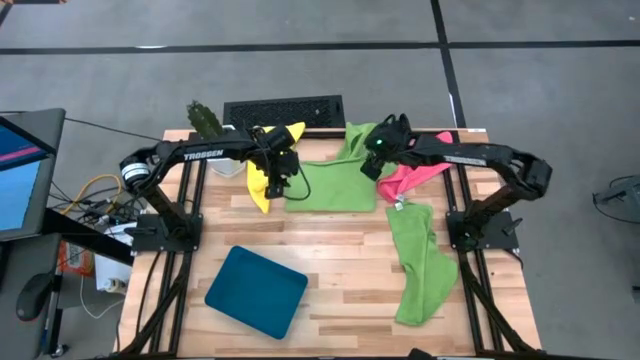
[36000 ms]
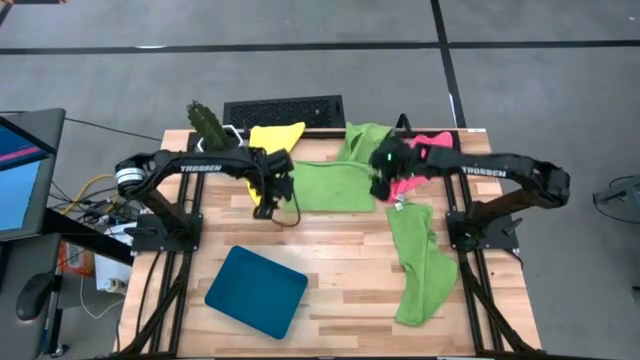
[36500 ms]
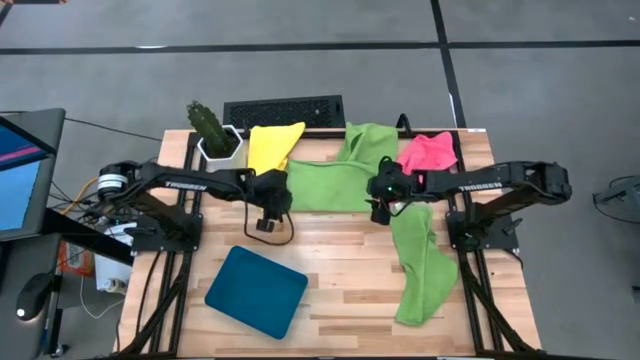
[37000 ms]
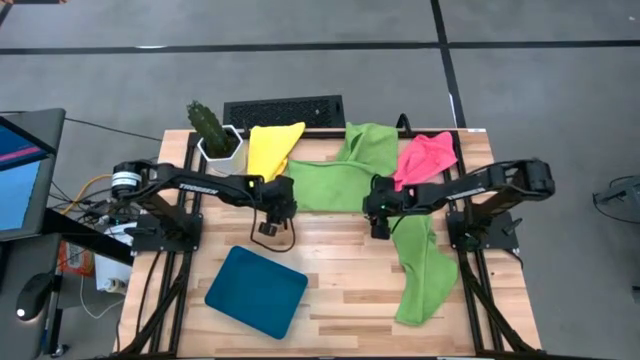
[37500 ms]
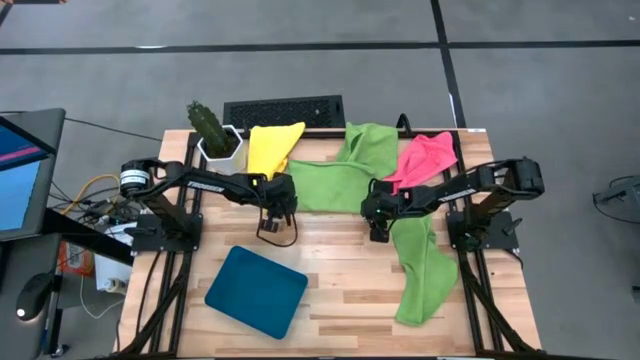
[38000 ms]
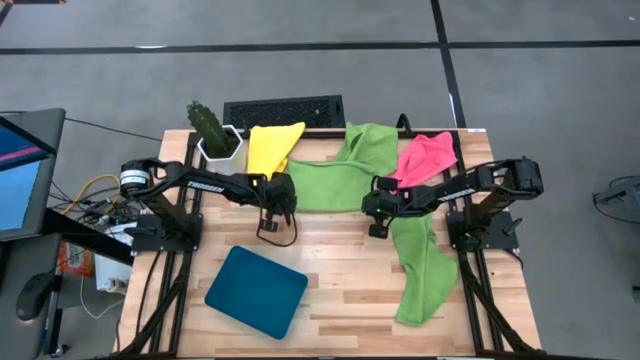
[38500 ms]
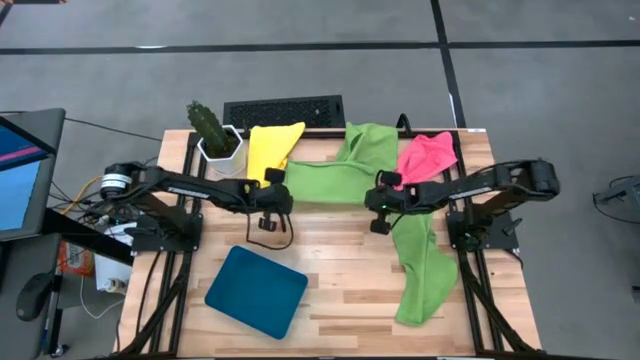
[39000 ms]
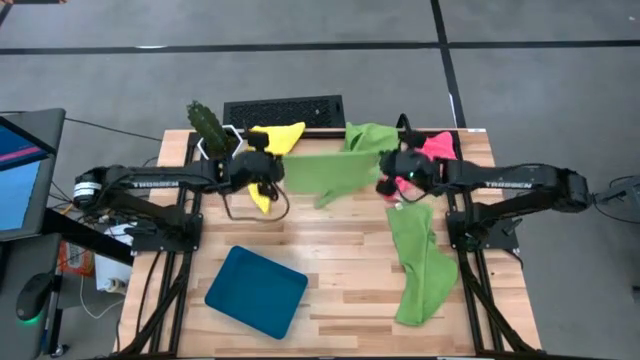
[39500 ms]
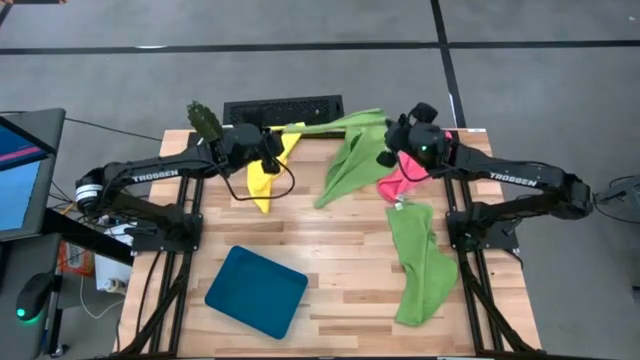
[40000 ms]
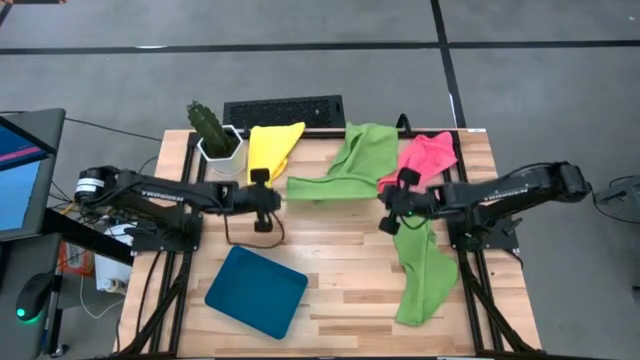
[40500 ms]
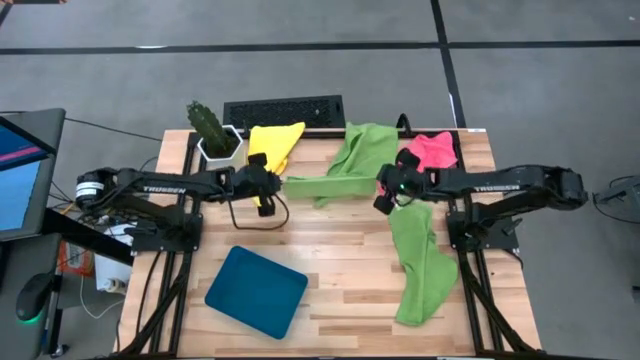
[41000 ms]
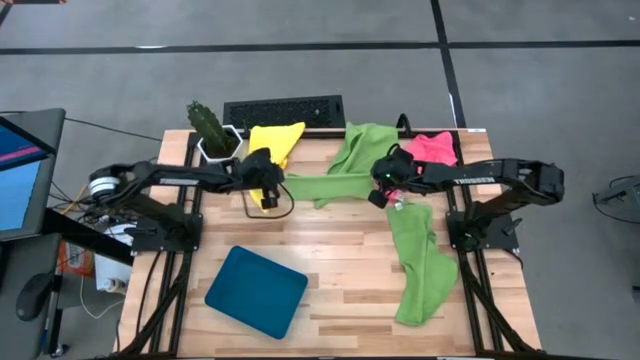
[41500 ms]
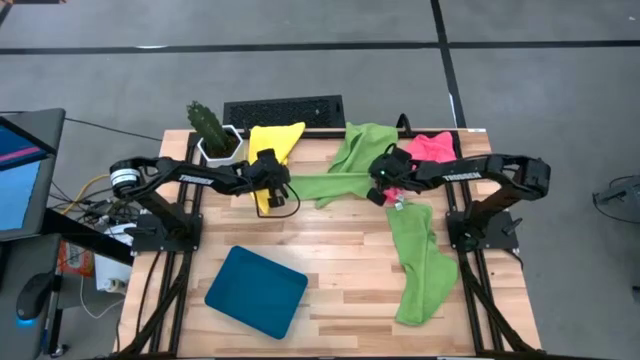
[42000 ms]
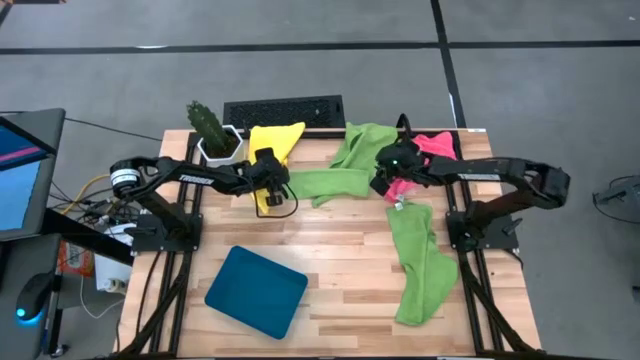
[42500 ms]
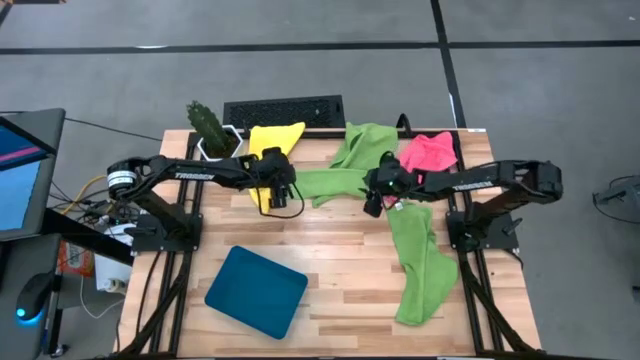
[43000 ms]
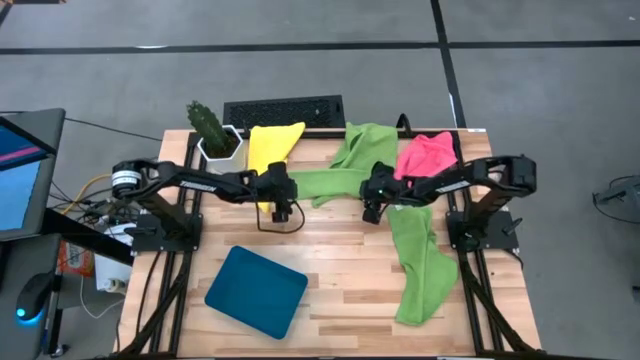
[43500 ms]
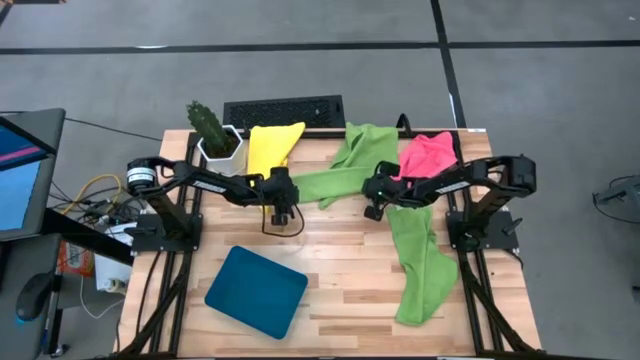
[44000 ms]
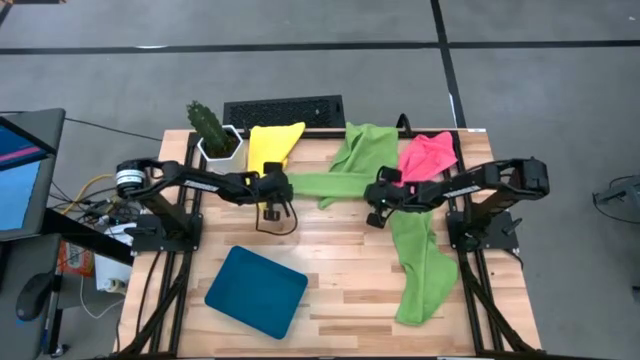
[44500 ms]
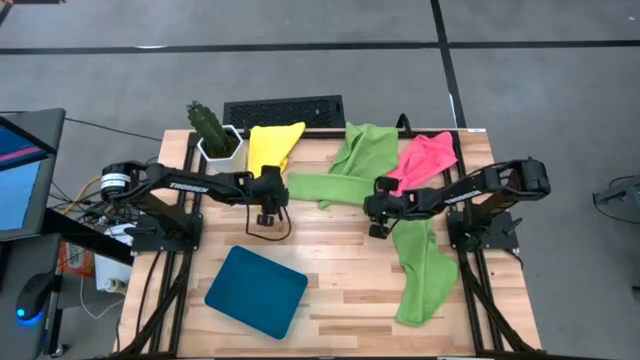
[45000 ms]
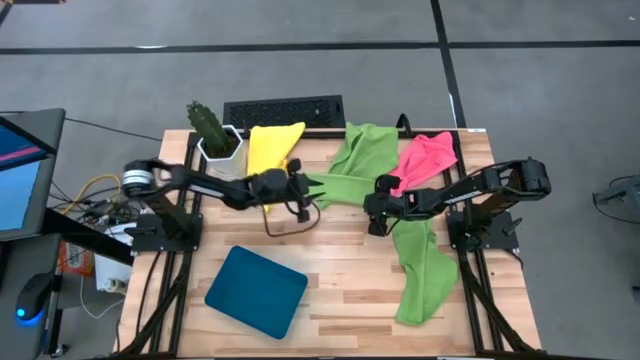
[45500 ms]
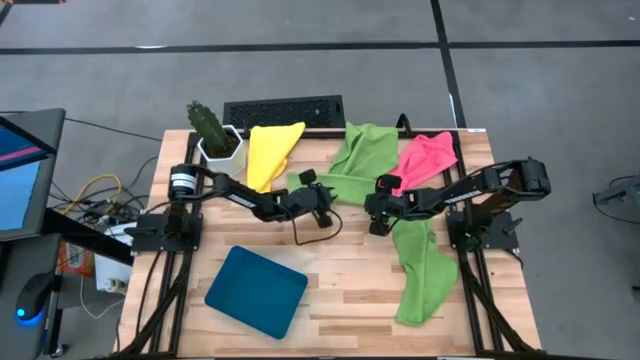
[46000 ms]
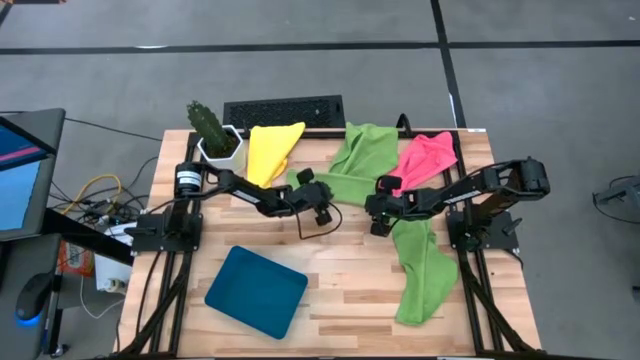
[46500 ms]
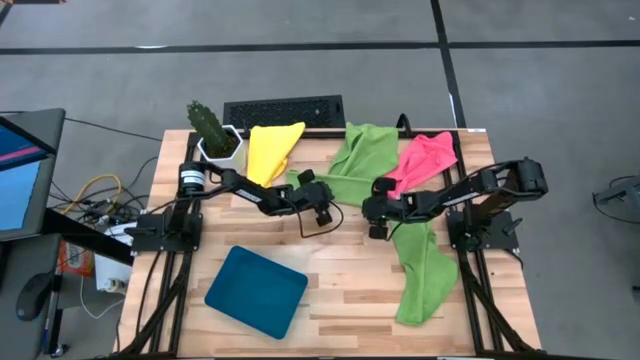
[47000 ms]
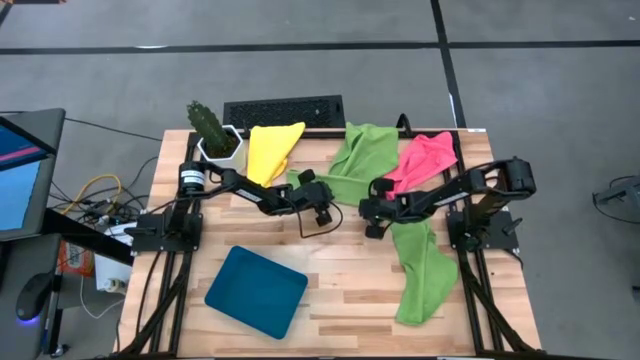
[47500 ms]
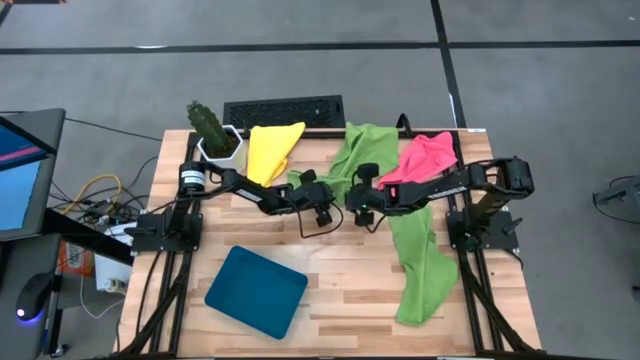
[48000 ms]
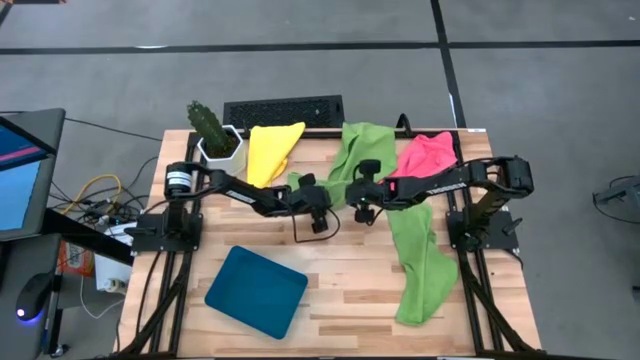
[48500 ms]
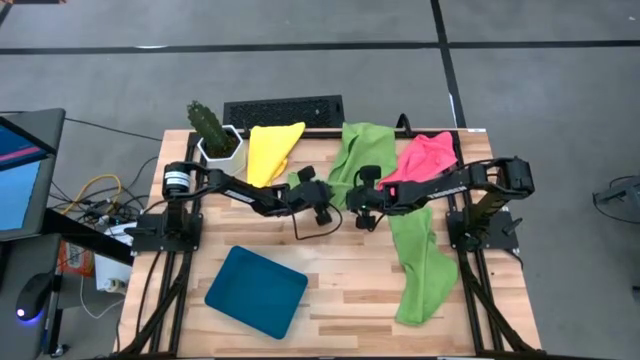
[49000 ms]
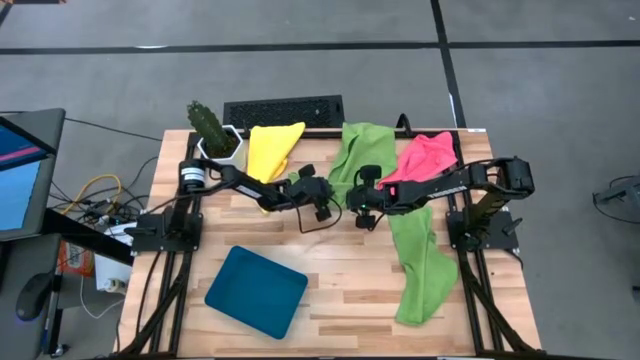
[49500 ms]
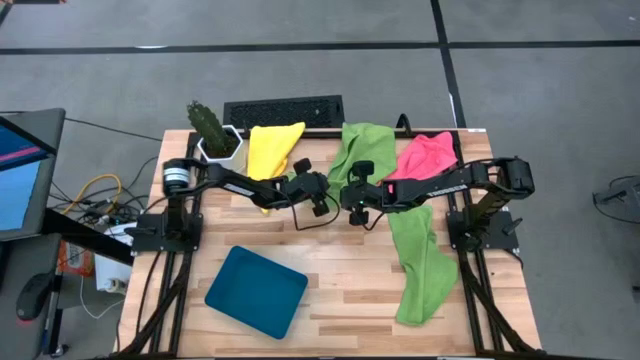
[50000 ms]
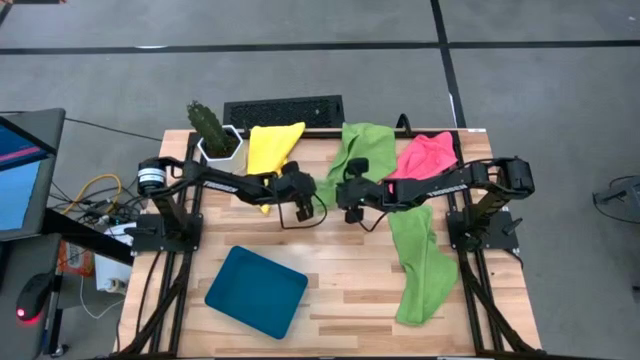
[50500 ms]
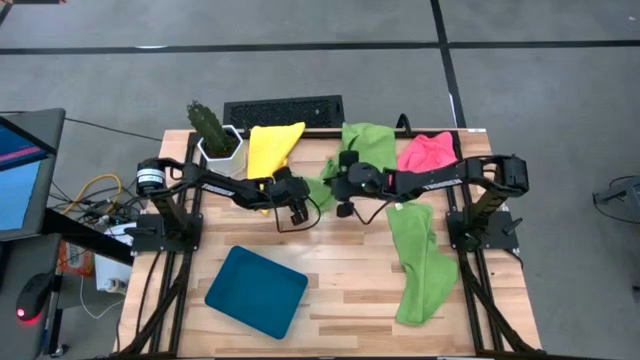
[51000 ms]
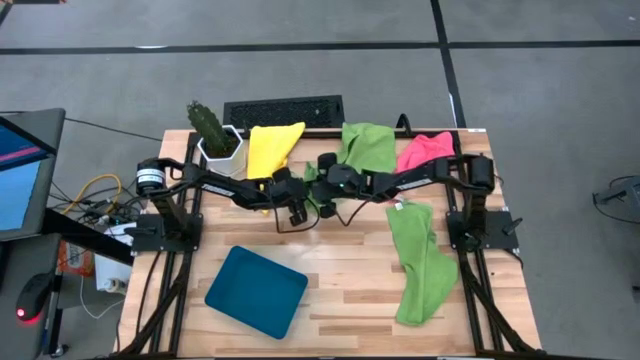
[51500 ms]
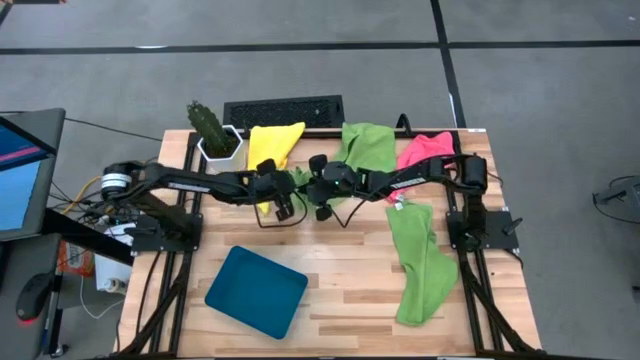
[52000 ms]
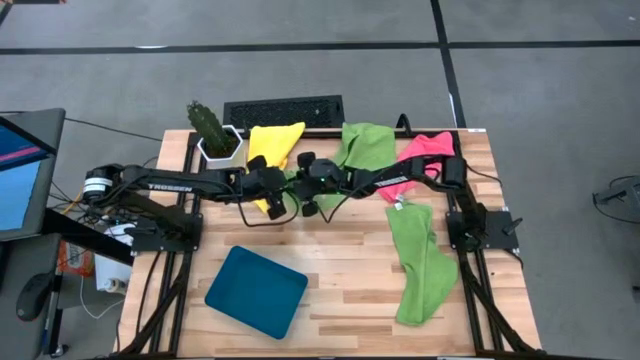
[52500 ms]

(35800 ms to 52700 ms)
Task: Fold microfiber towels
Fold the top left green microfiber

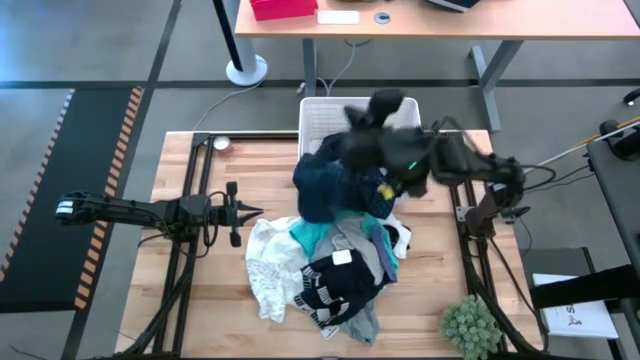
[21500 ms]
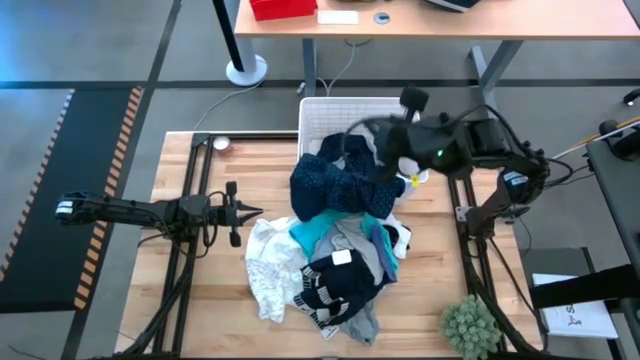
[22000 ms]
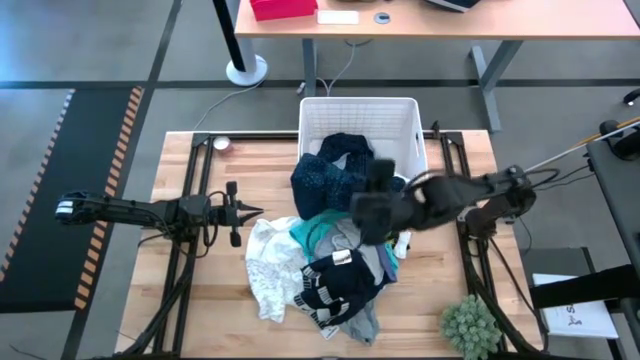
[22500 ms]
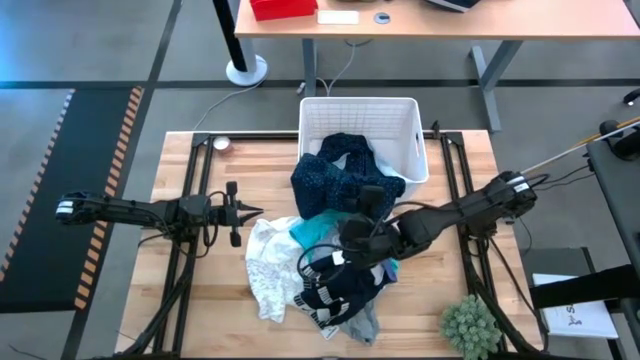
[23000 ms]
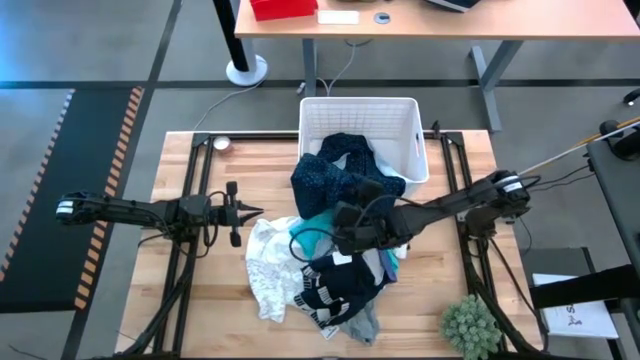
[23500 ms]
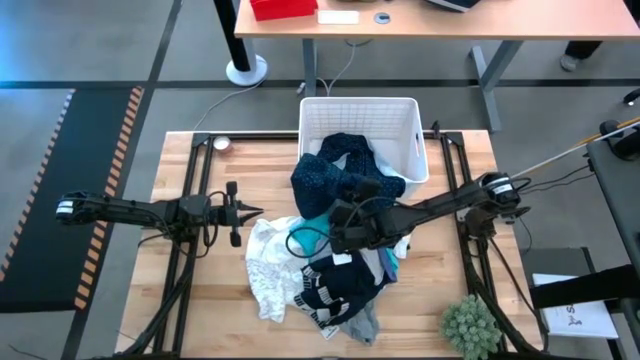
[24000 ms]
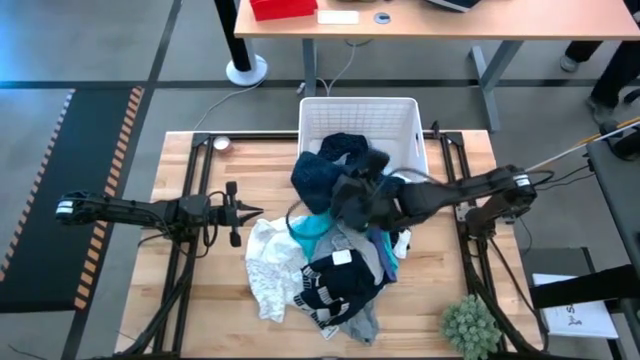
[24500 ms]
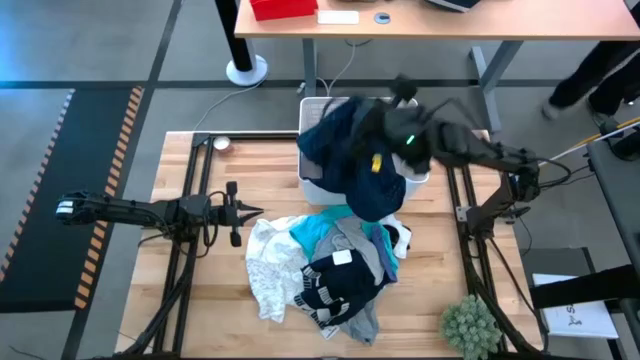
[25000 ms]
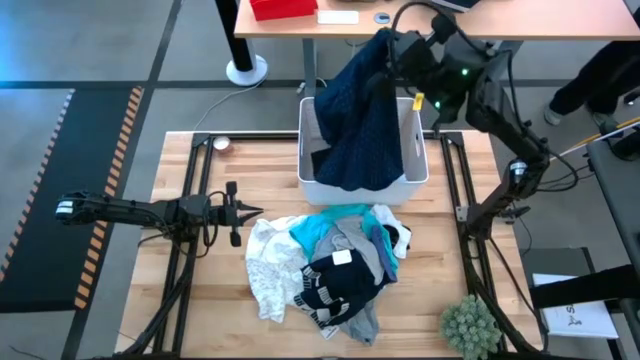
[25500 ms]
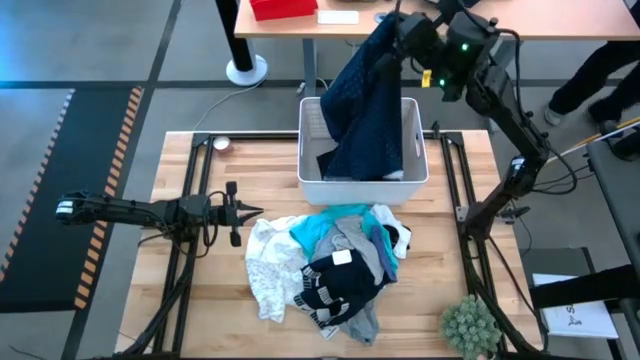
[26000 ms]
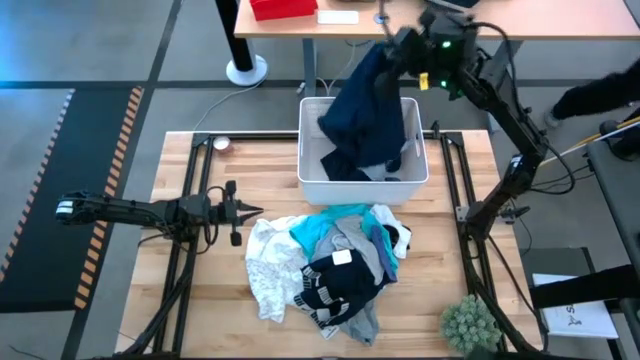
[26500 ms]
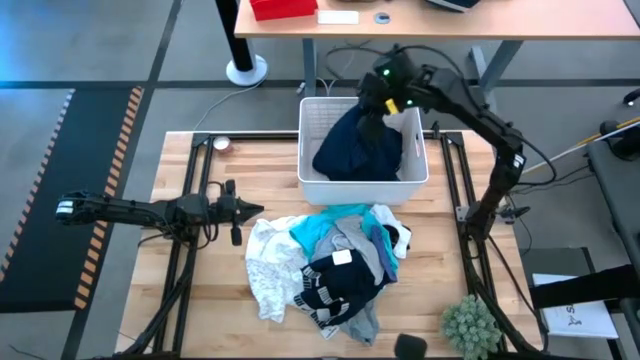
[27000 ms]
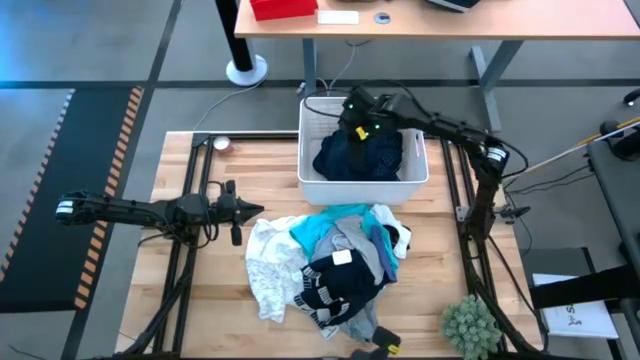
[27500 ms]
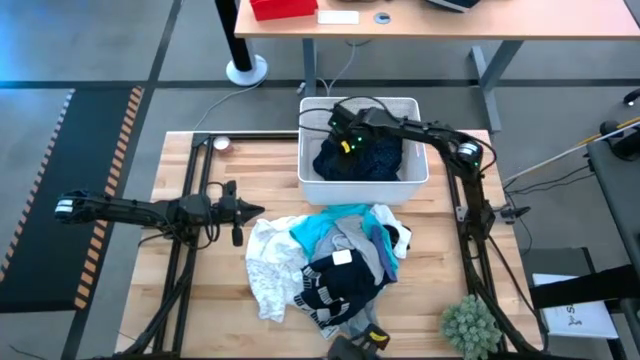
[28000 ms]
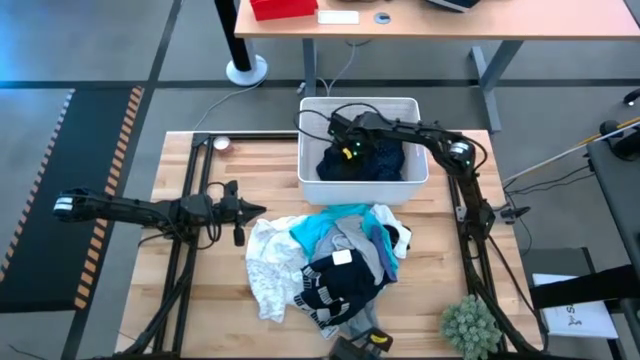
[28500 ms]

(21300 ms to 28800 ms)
Task: Sort clothes
Put the blue polo shirt into the white laundry bin
